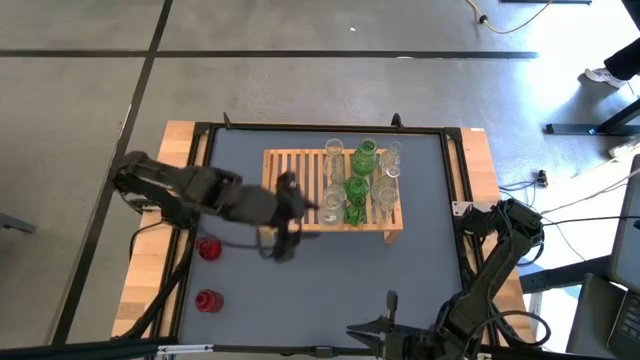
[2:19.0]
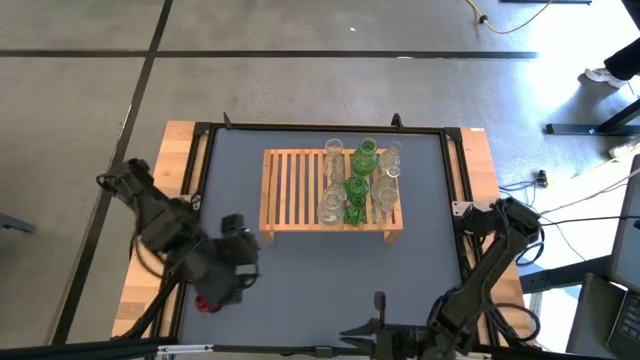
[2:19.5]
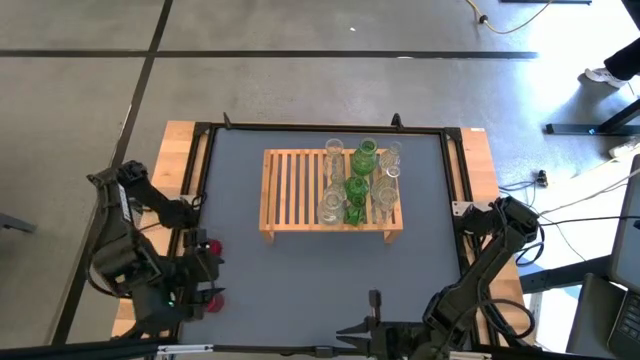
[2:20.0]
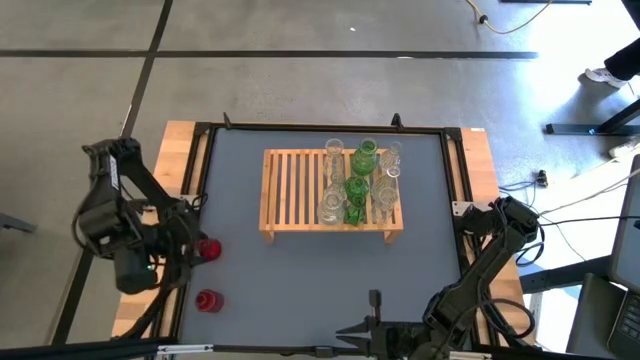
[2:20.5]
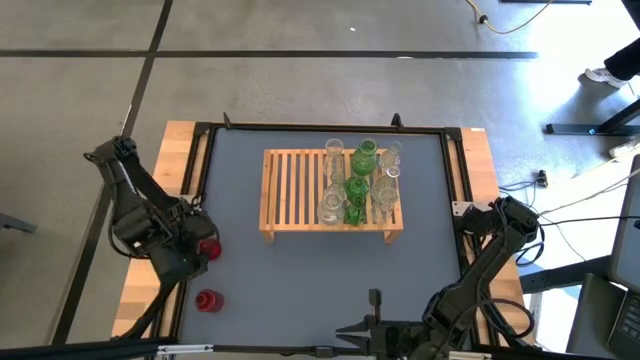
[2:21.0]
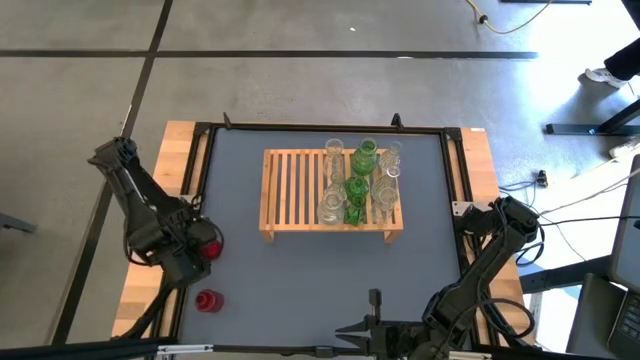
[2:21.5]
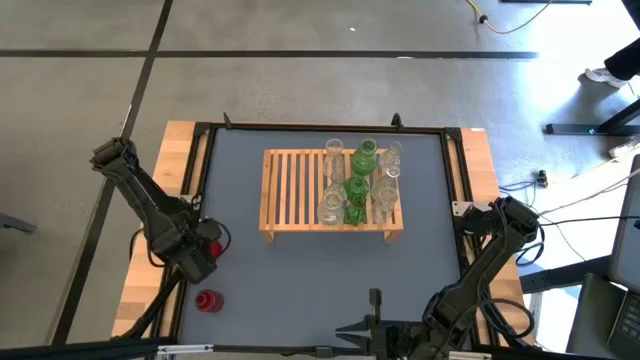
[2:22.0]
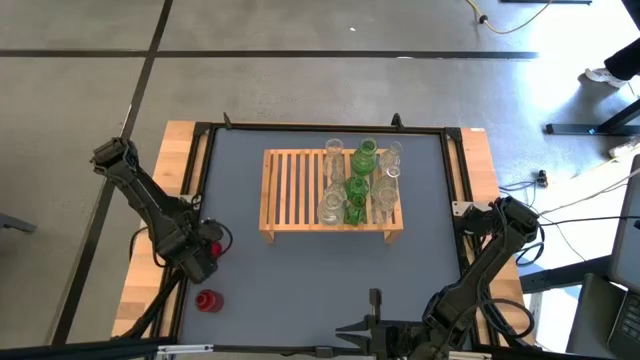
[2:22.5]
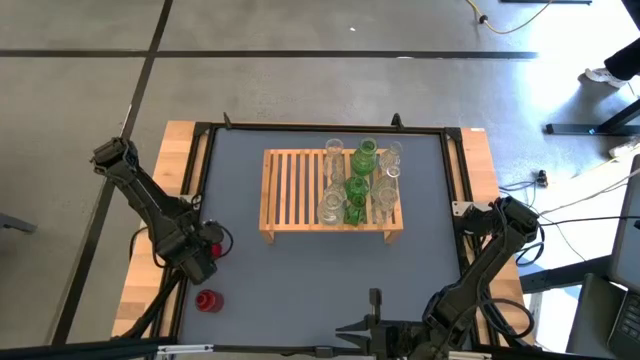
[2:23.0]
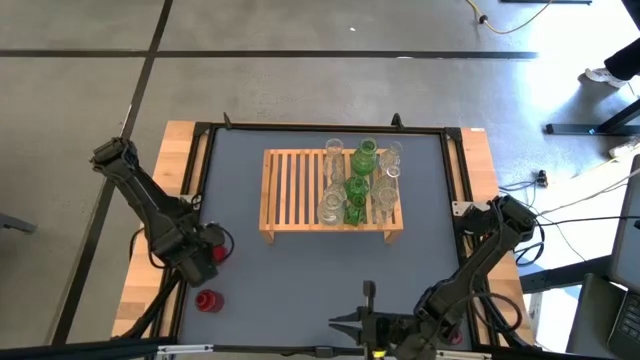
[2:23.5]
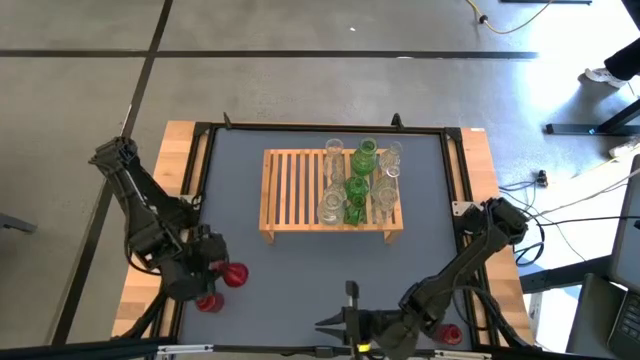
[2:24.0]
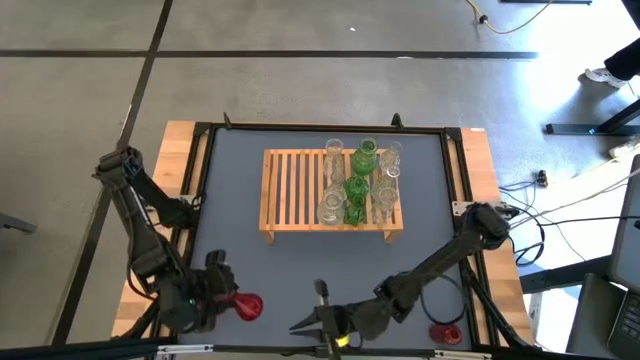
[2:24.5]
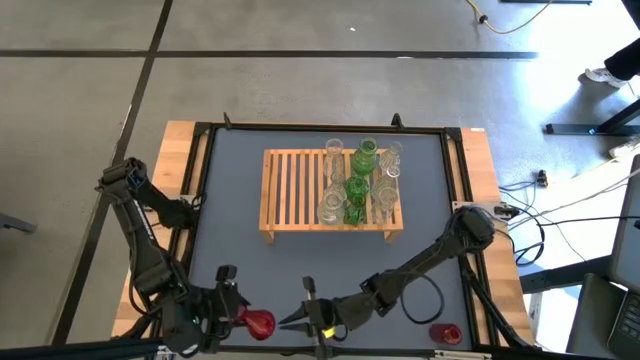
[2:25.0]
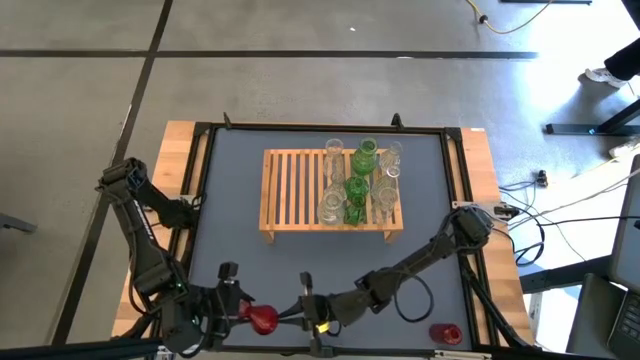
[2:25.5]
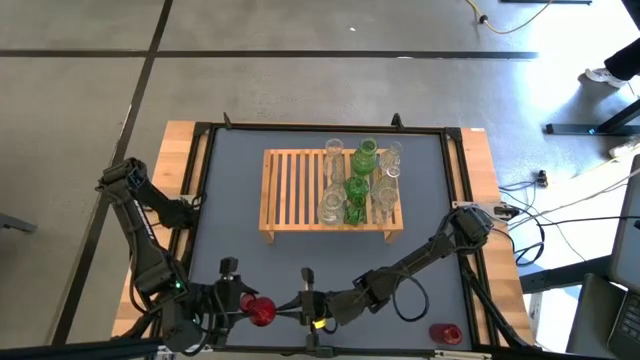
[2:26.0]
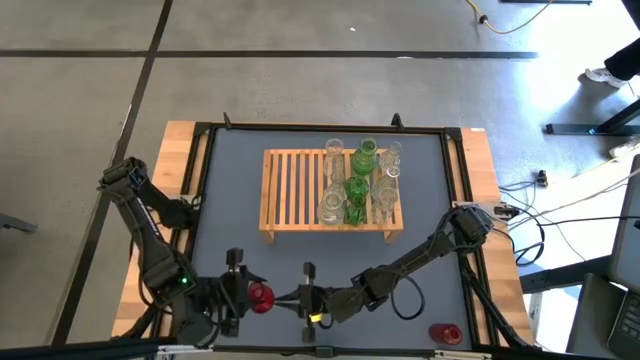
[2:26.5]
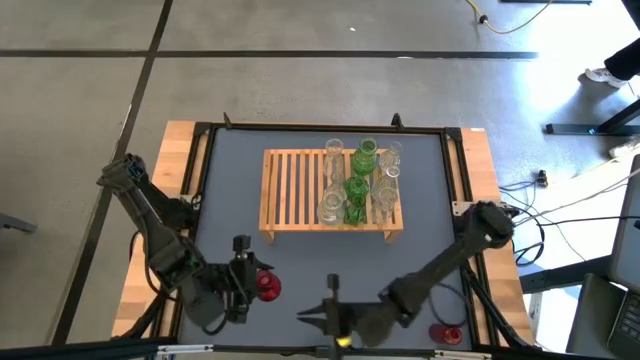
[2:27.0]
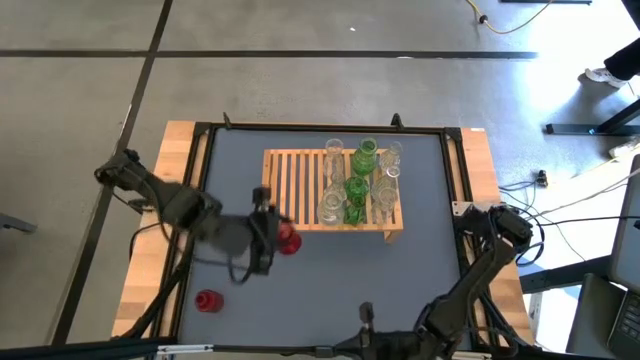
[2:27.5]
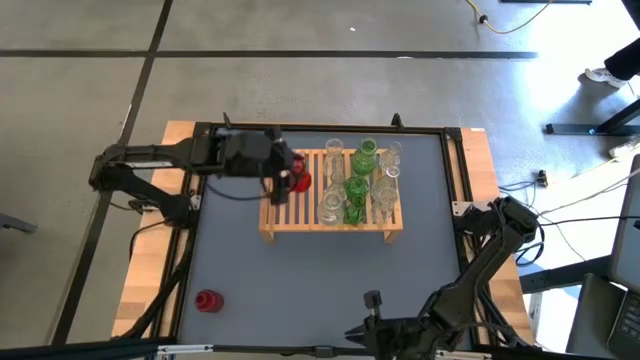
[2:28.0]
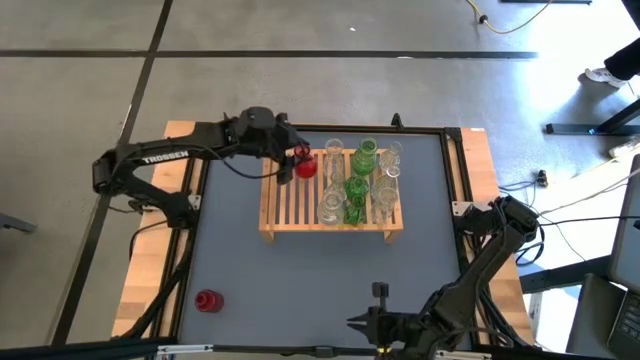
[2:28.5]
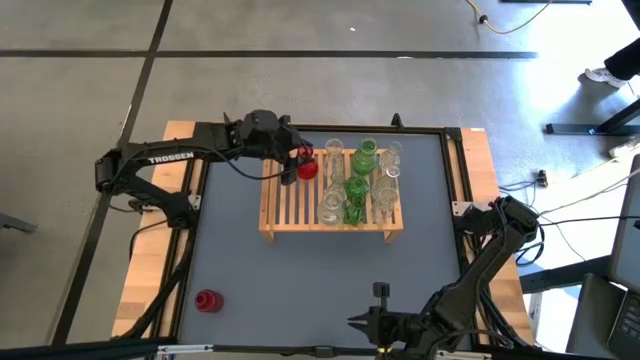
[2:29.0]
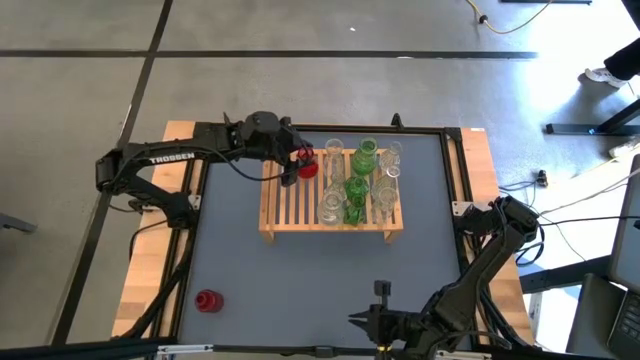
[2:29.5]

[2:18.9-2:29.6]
Task: sort vases onto shelf
Put the middle left red bottle on the shelf

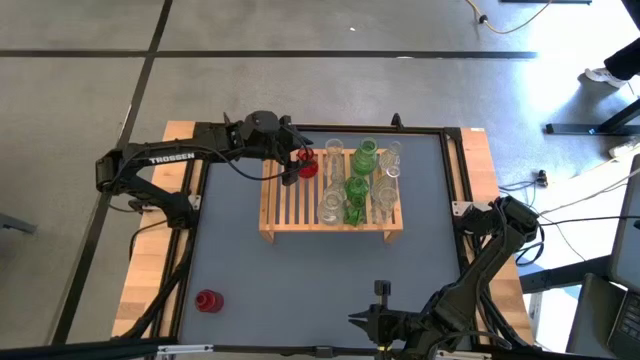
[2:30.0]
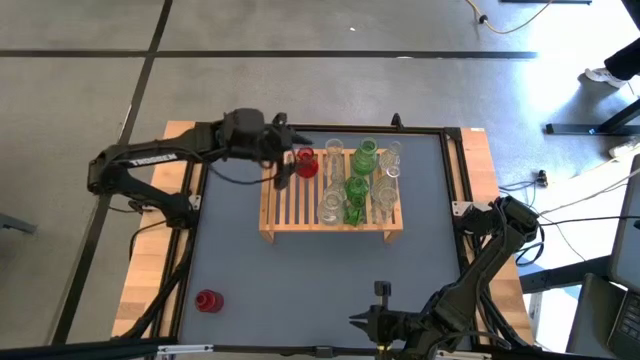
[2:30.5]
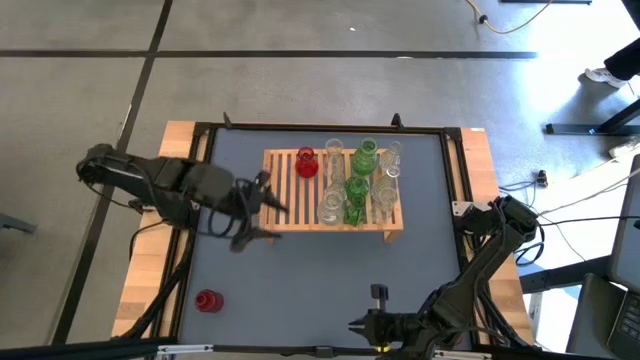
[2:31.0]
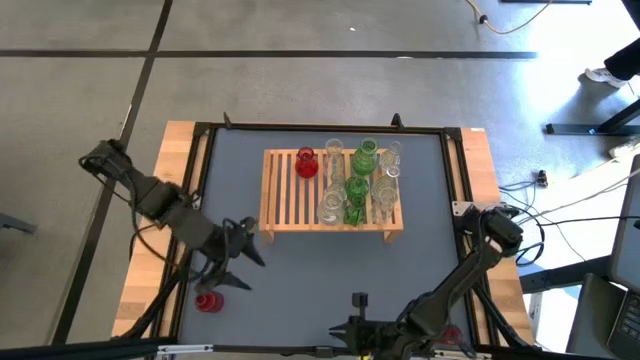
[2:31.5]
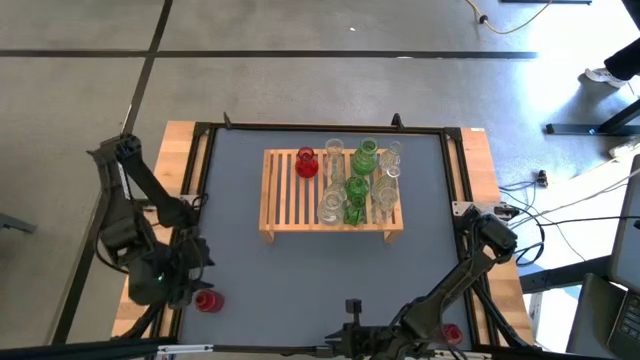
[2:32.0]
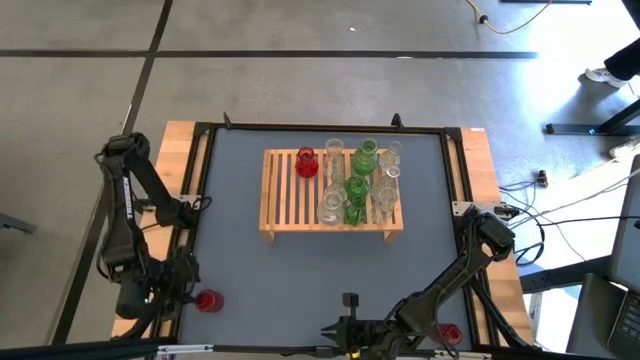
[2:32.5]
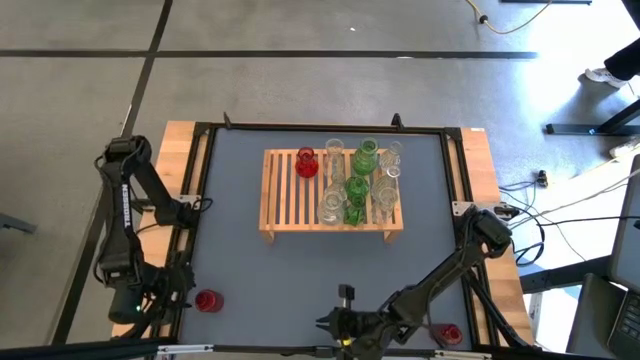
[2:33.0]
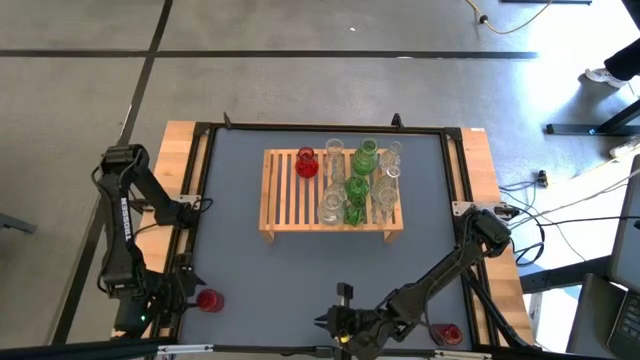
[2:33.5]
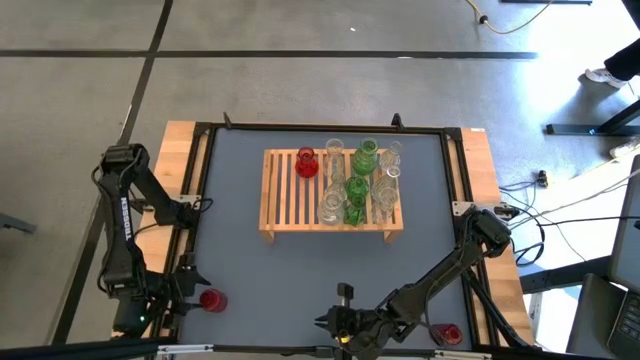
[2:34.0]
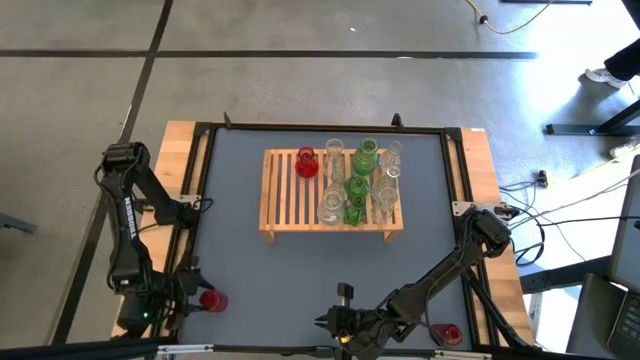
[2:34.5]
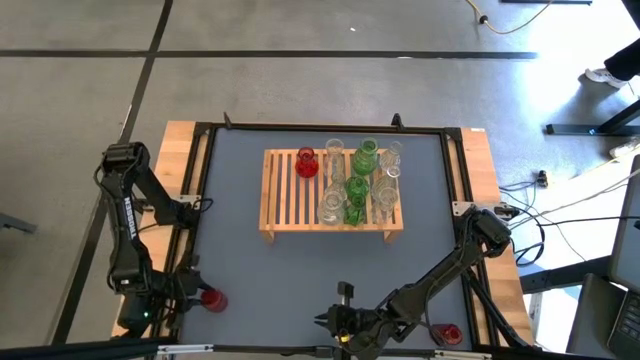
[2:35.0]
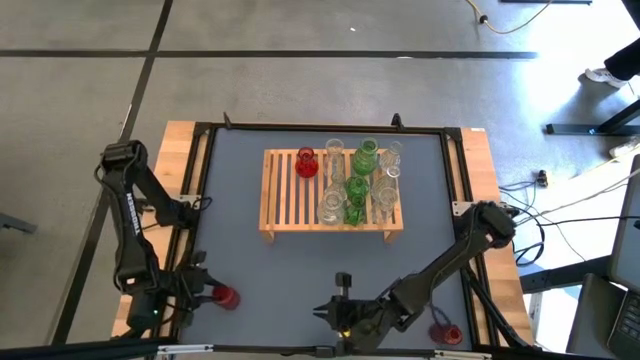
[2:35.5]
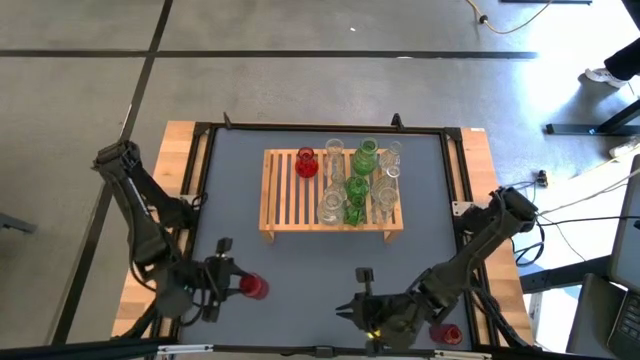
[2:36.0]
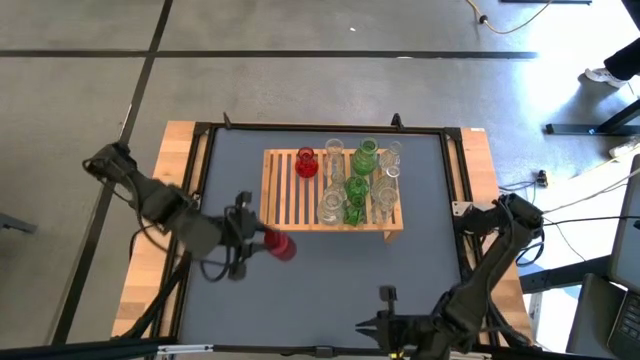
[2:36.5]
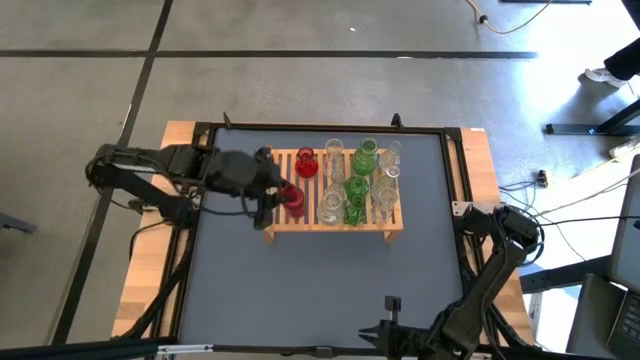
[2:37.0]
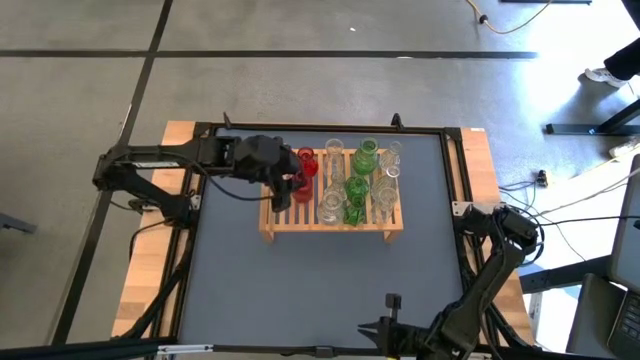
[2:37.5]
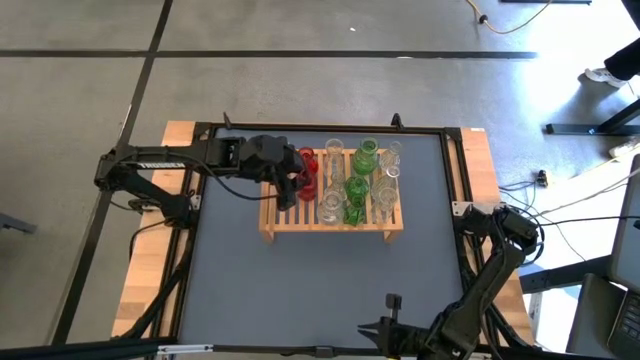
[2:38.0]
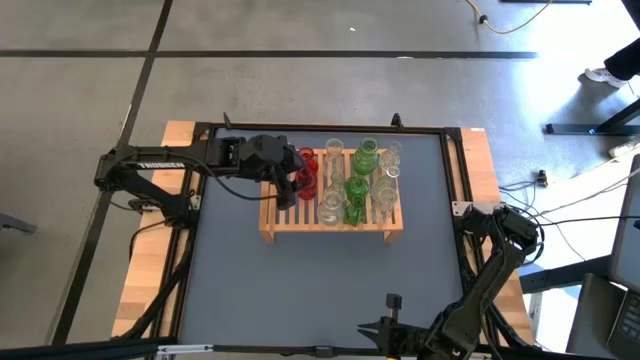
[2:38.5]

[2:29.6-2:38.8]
Put the bottom left red bottle on the shelf
